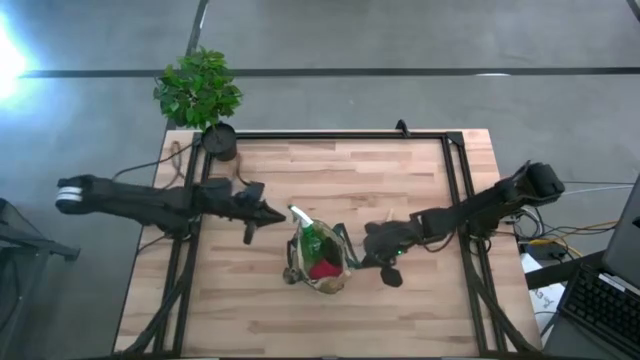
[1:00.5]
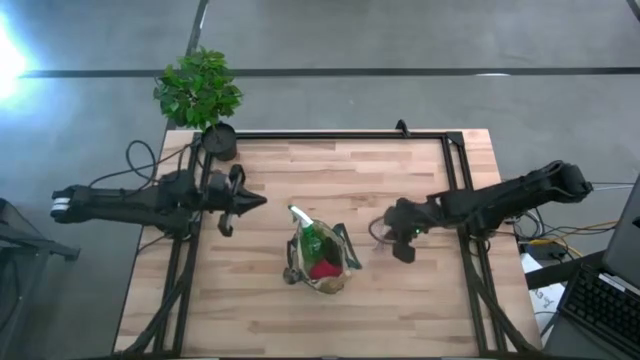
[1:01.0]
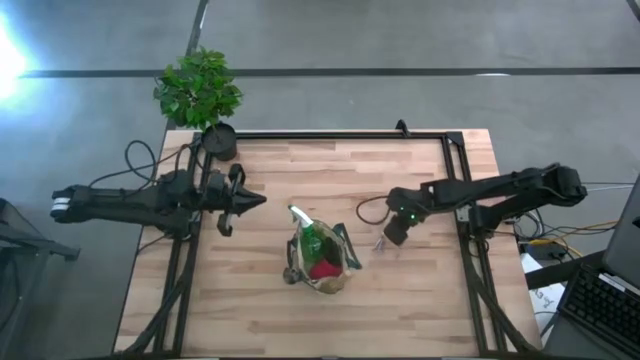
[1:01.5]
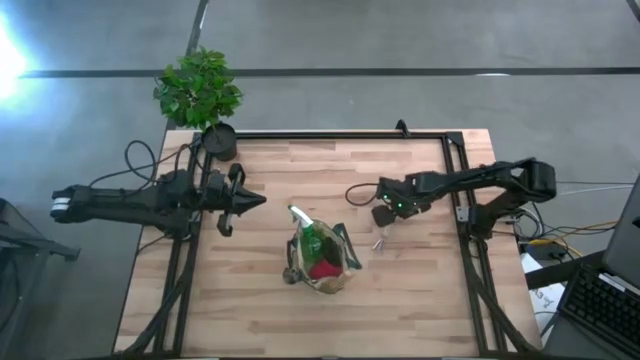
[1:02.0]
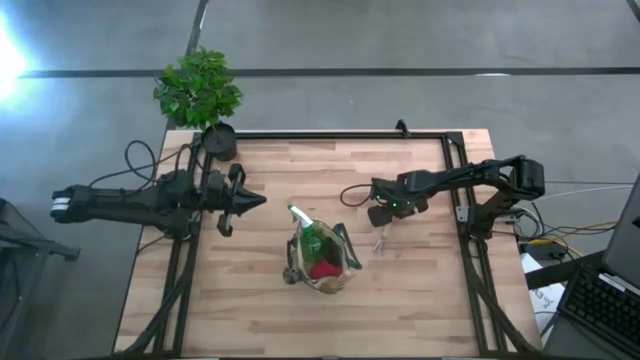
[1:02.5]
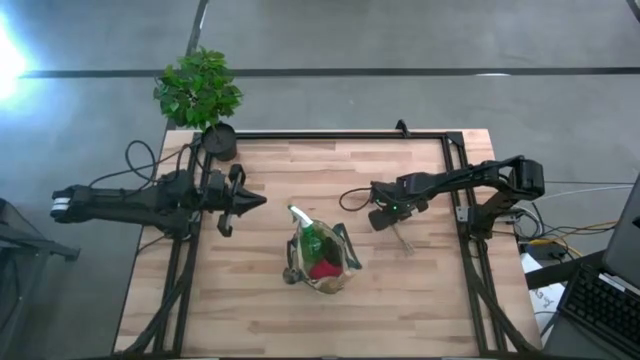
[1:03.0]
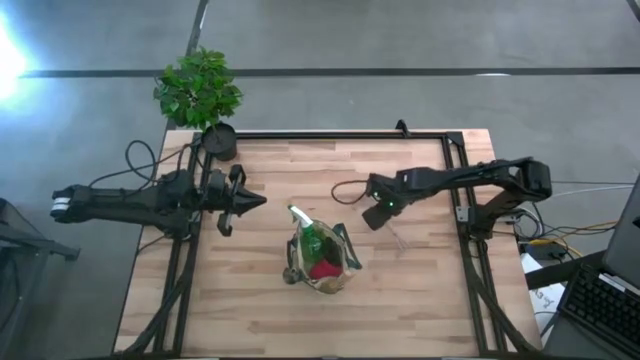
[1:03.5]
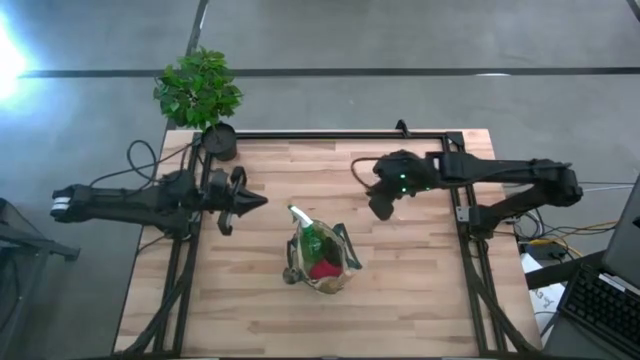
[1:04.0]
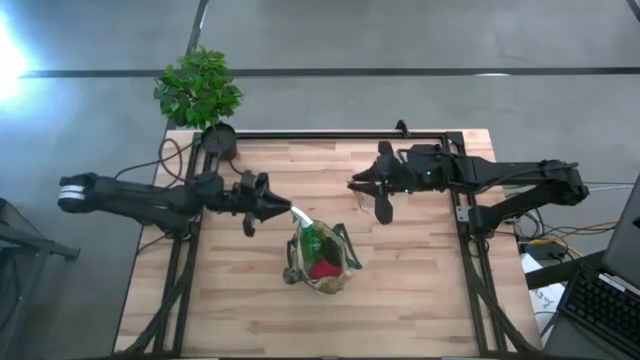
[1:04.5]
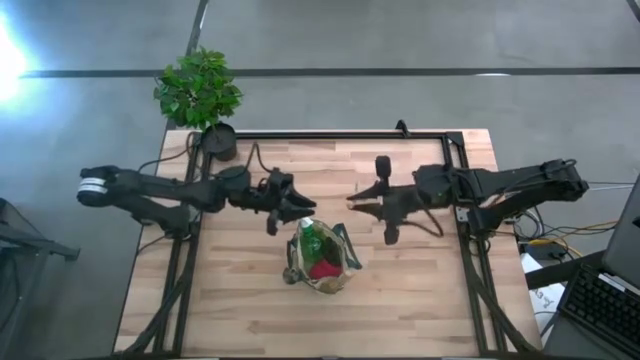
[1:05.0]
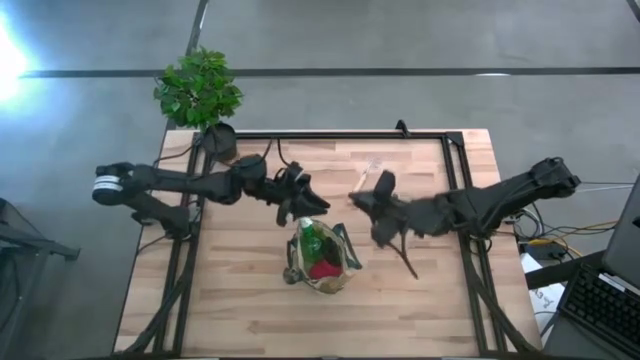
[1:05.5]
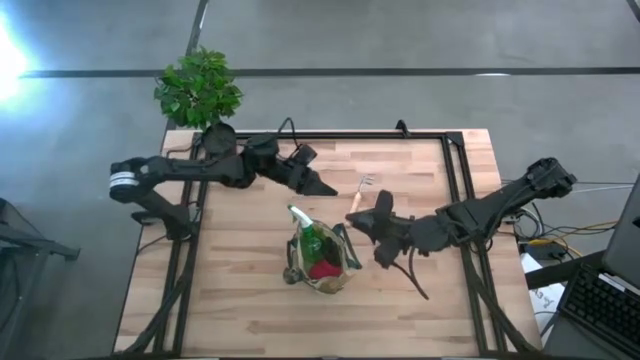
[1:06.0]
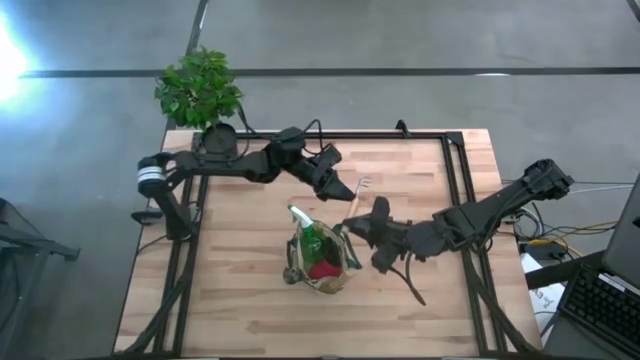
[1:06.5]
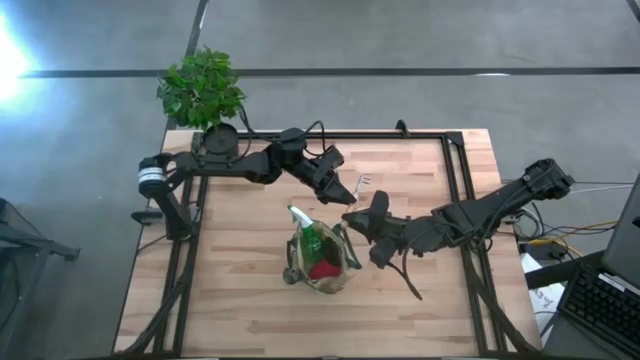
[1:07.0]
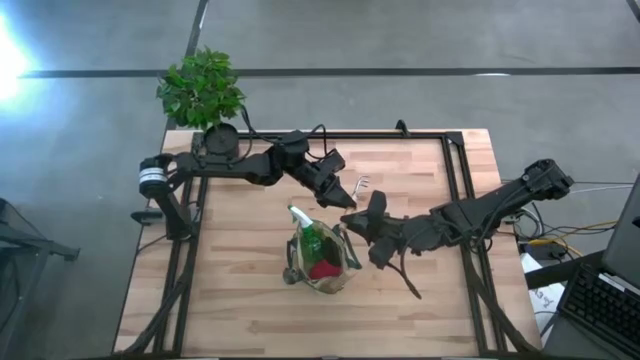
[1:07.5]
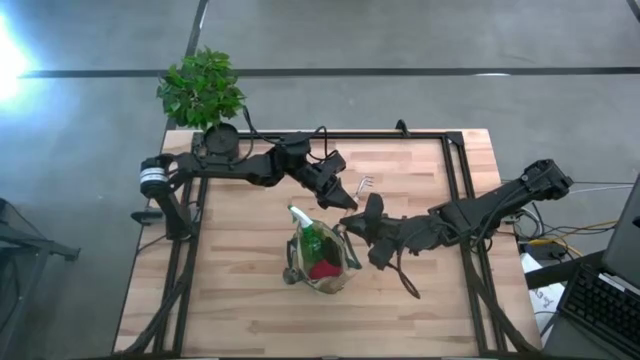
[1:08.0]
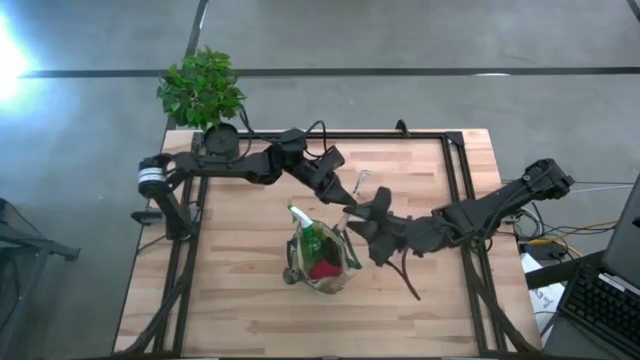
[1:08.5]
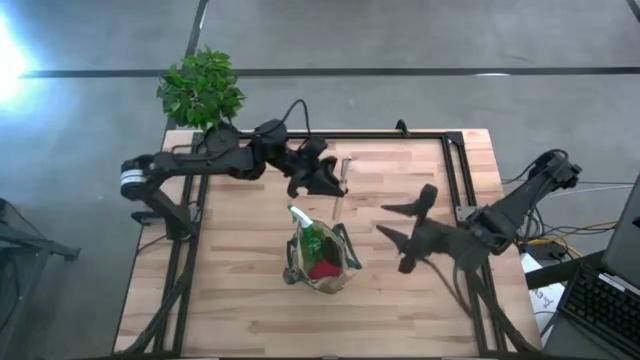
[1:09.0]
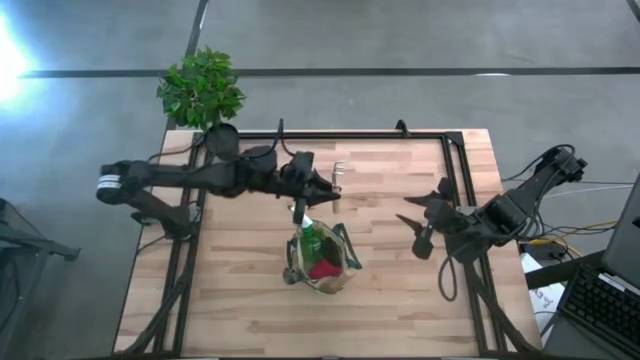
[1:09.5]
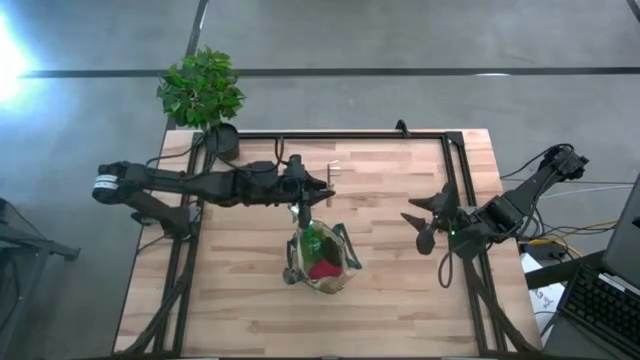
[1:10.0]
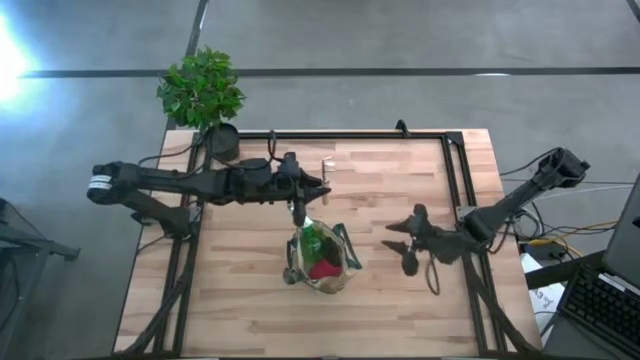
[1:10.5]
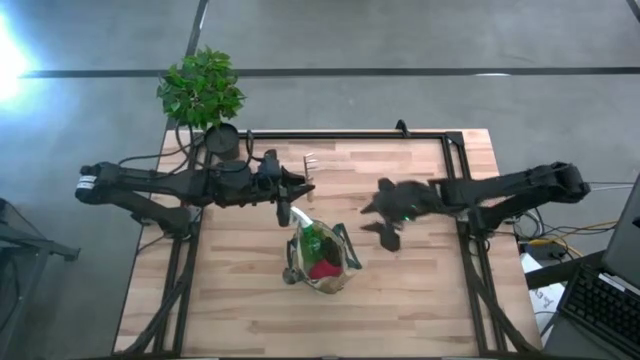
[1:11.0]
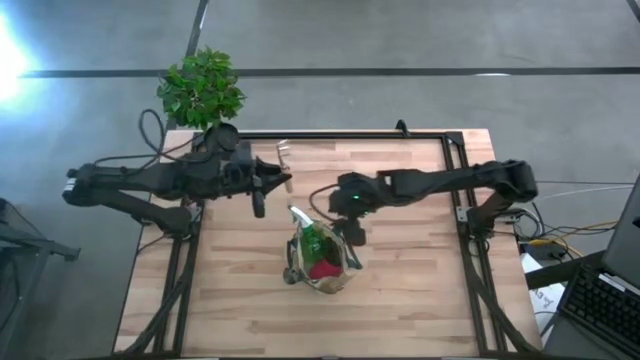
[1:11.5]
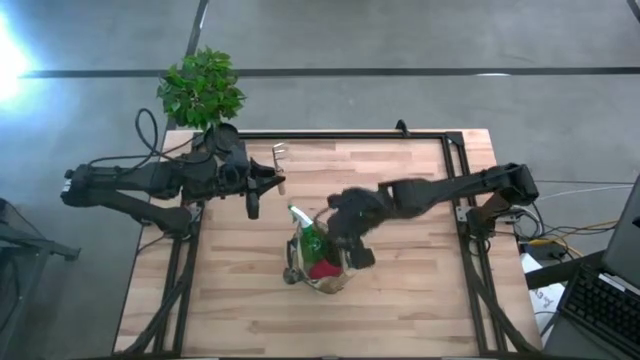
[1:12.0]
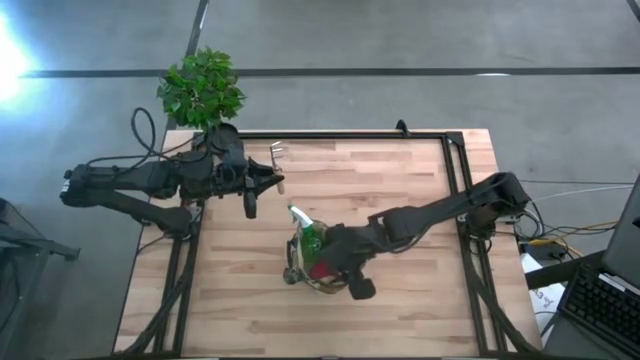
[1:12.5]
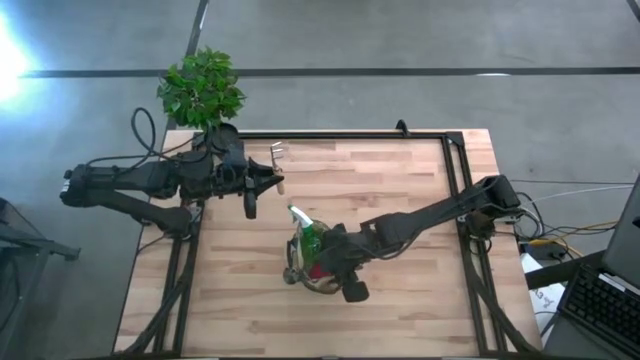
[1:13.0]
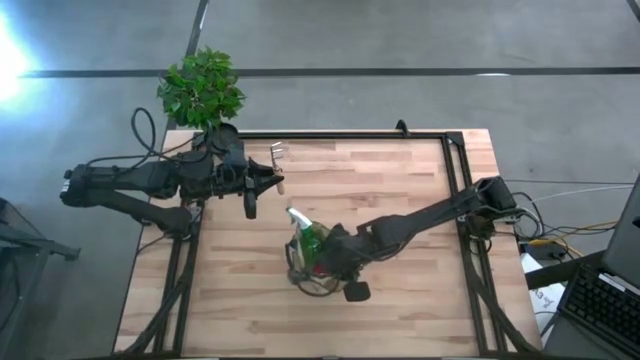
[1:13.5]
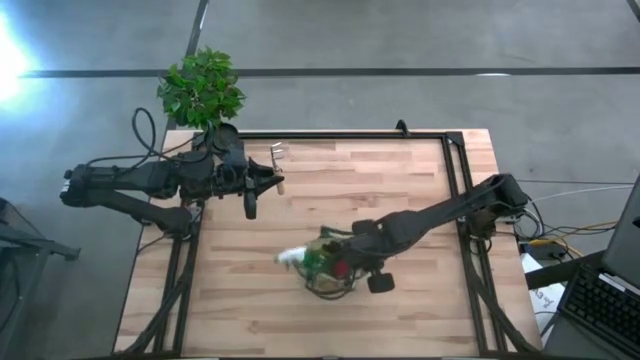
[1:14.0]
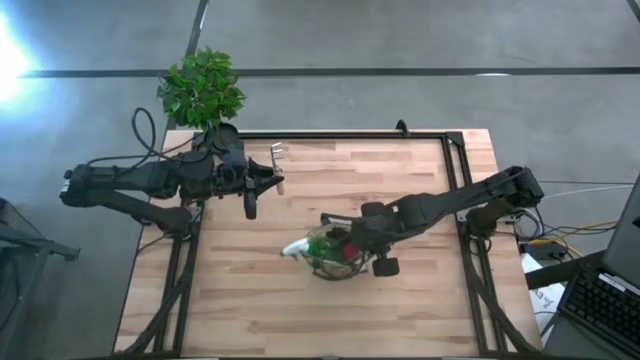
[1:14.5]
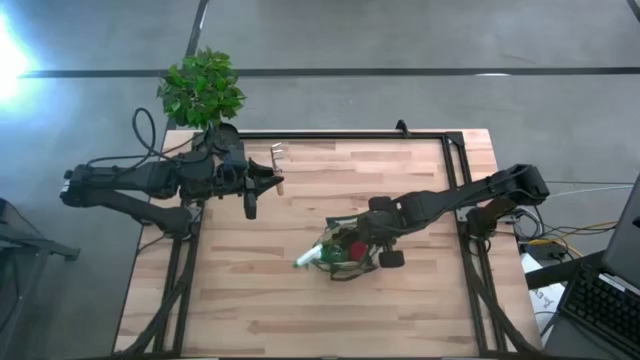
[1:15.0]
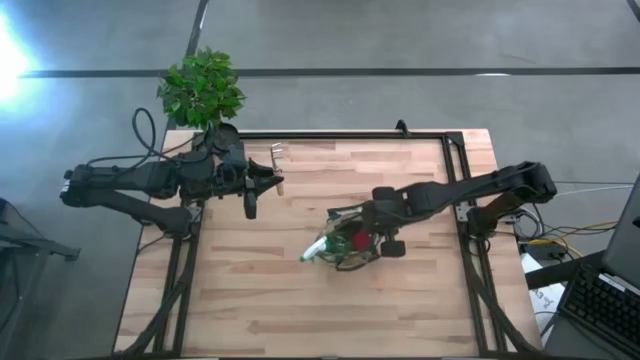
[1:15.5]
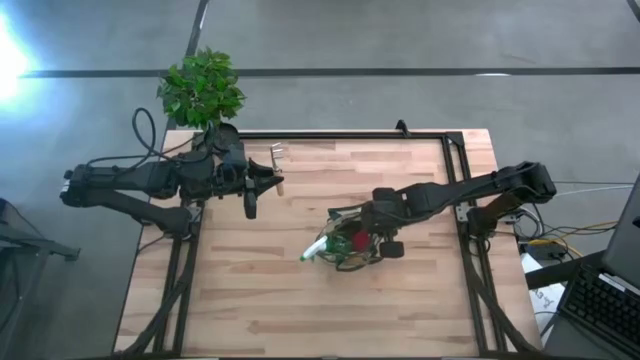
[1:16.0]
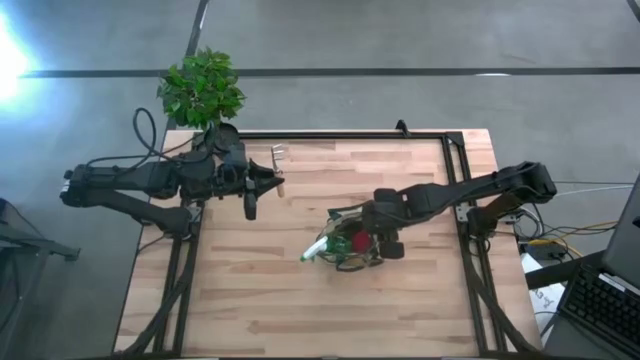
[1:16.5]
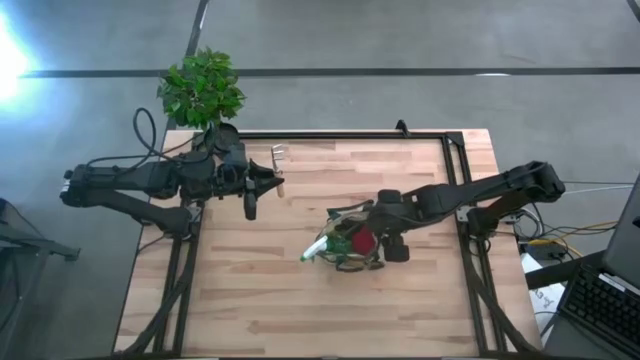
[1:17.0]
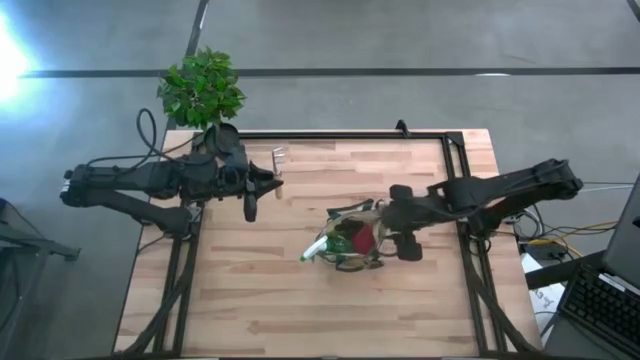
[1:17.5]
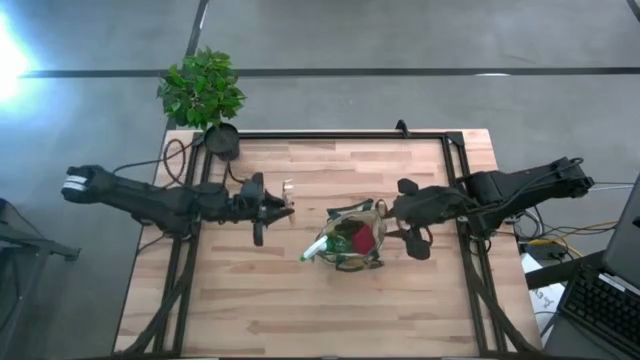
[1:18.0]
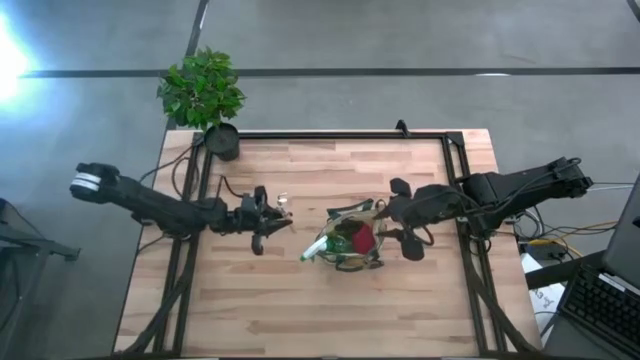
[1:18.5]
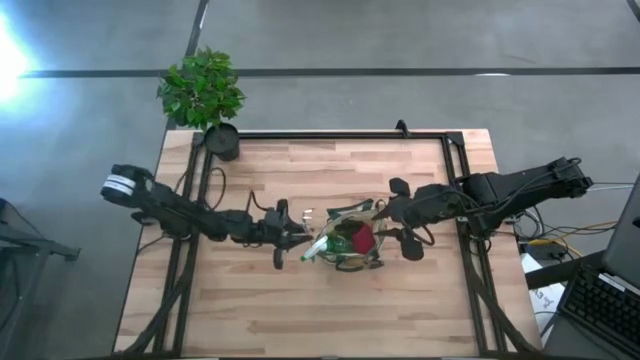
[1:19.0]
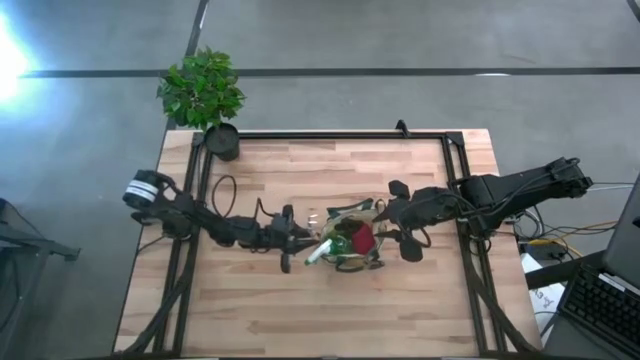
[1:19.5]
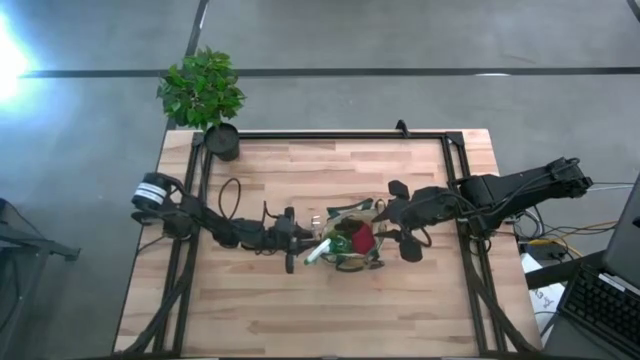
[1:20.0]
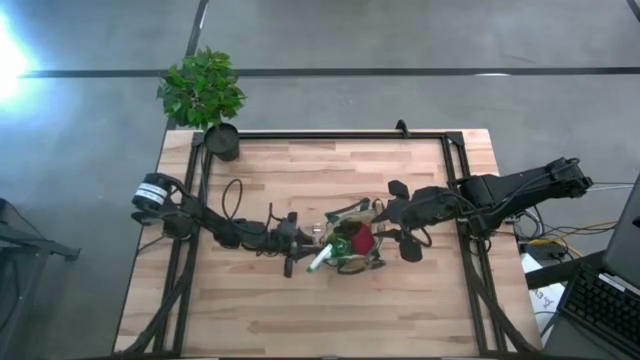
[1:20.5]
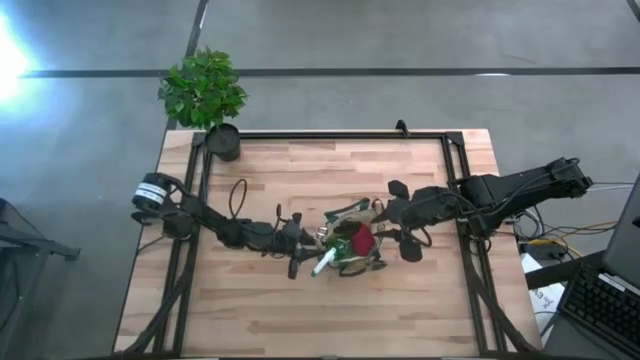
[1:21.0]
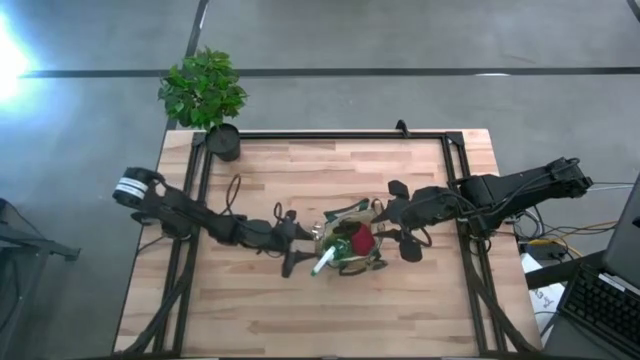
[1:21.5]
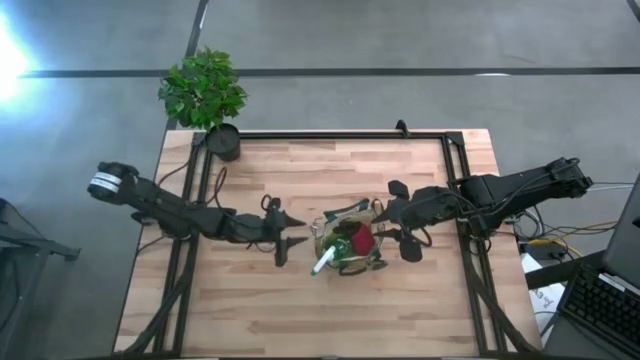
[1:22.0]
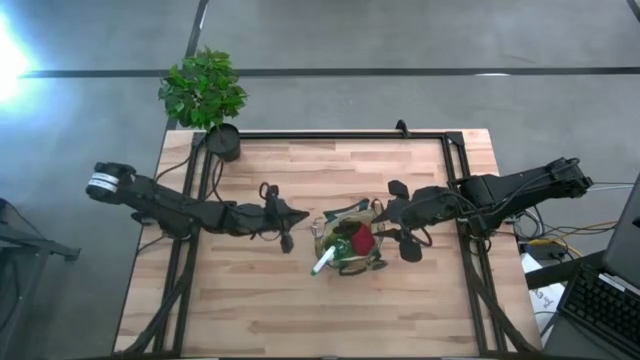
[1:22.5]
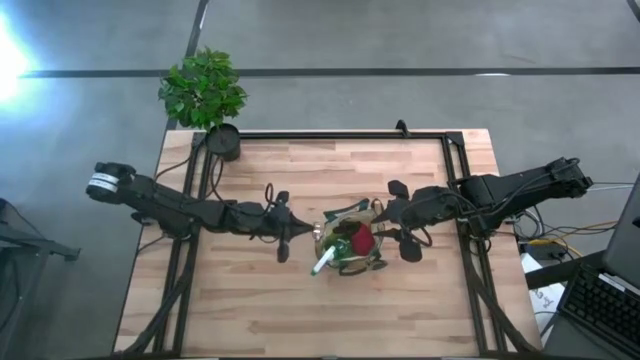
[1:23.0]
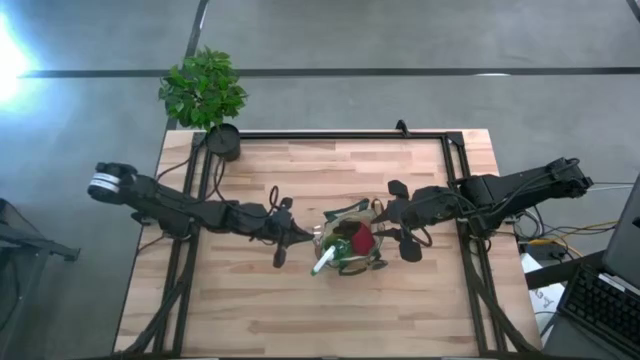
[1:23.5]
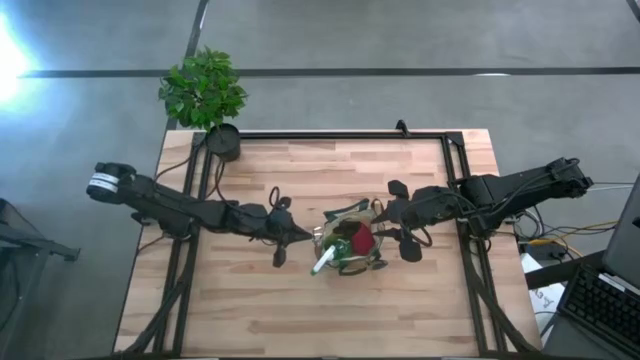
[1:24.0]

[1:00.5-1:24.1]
Task: Pick & Place Garden tools in Gardening bag
Put the hand rake into the gardening bag
